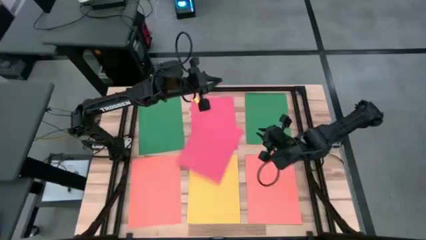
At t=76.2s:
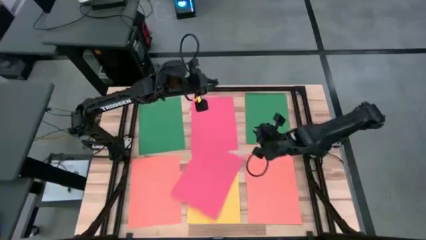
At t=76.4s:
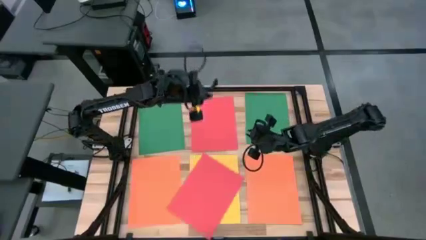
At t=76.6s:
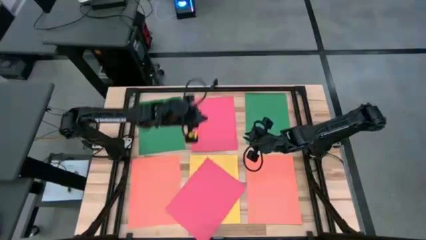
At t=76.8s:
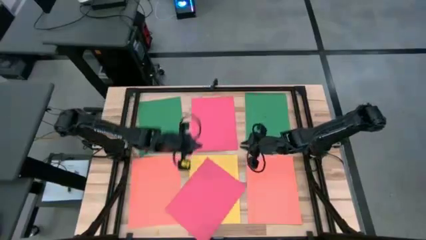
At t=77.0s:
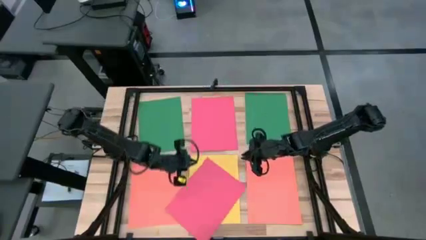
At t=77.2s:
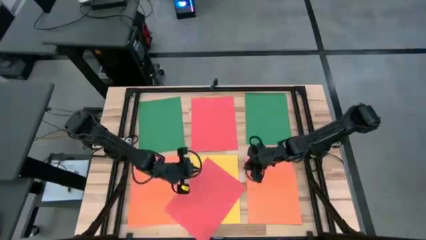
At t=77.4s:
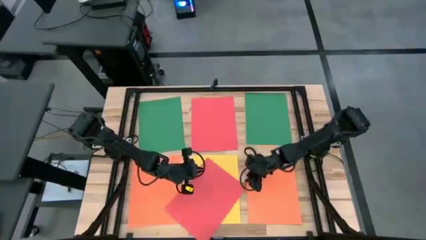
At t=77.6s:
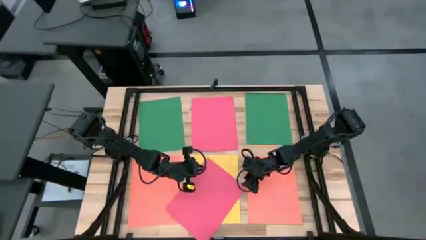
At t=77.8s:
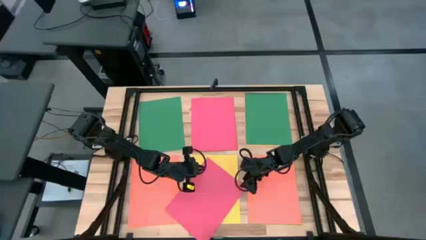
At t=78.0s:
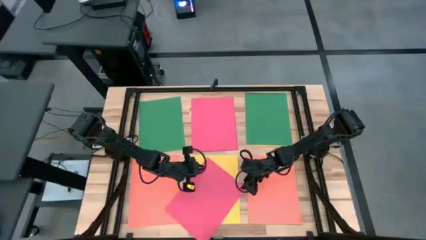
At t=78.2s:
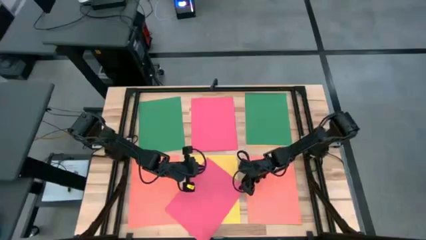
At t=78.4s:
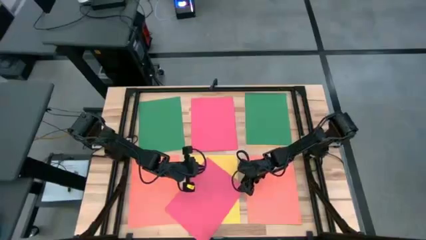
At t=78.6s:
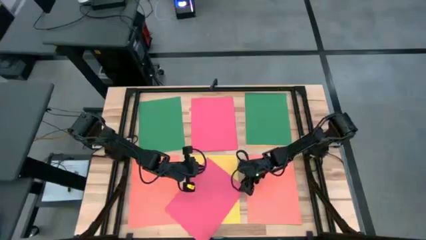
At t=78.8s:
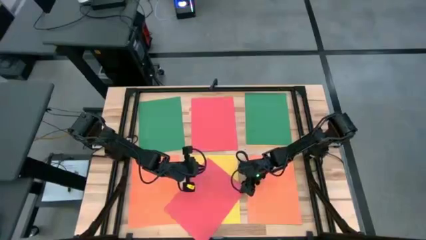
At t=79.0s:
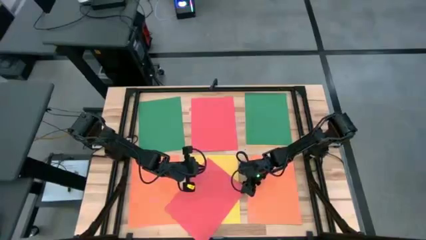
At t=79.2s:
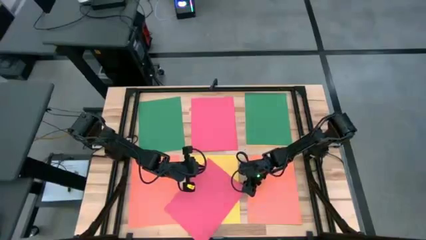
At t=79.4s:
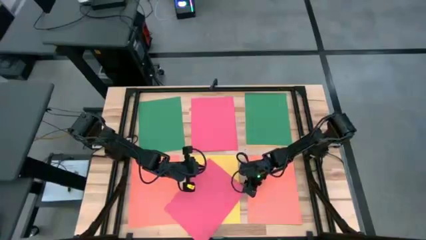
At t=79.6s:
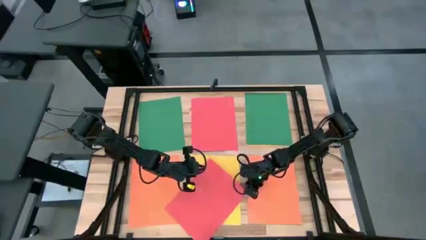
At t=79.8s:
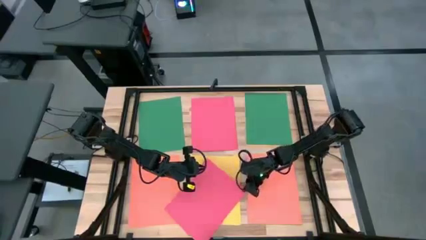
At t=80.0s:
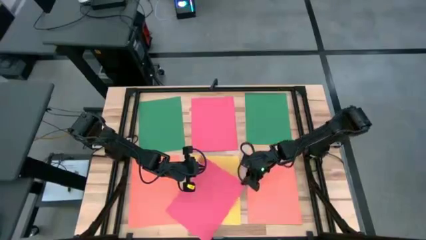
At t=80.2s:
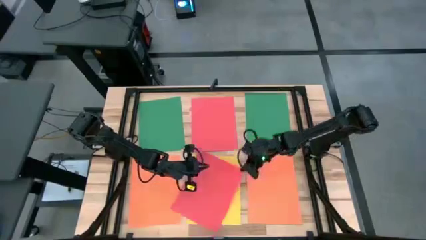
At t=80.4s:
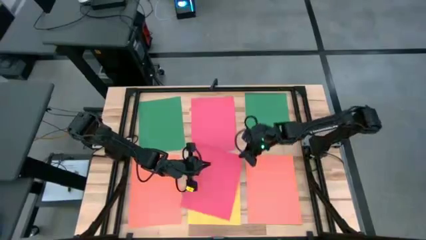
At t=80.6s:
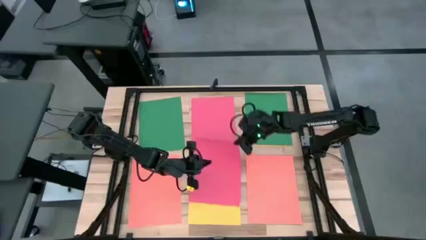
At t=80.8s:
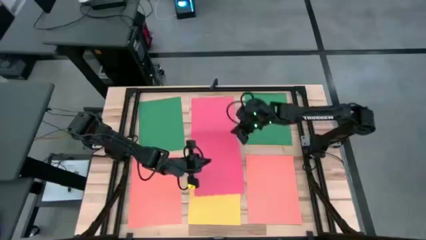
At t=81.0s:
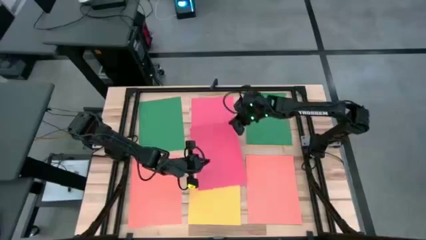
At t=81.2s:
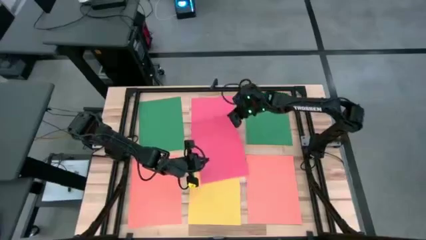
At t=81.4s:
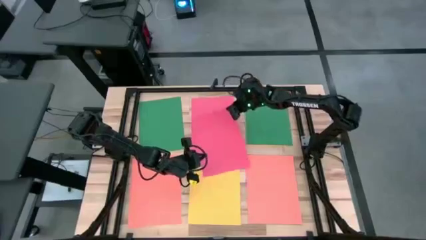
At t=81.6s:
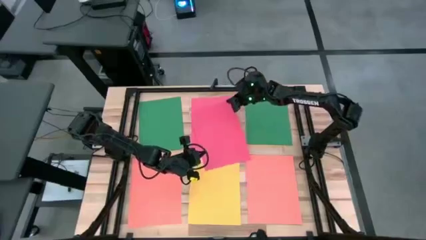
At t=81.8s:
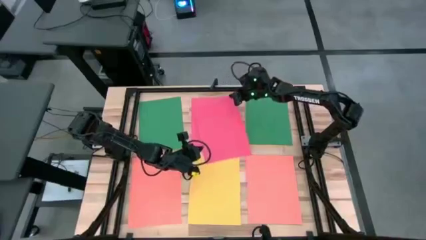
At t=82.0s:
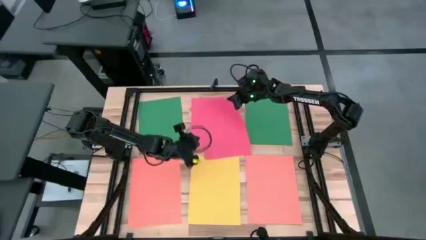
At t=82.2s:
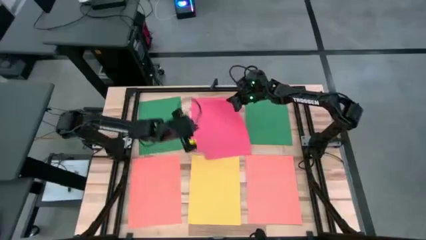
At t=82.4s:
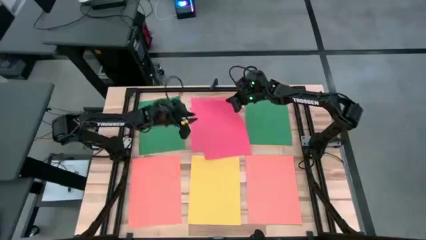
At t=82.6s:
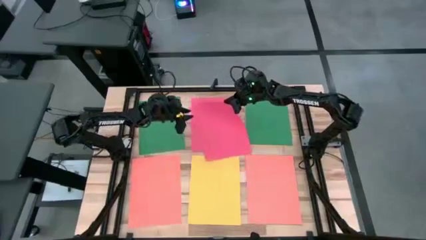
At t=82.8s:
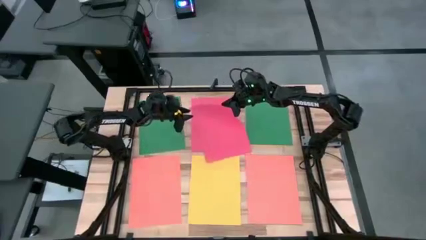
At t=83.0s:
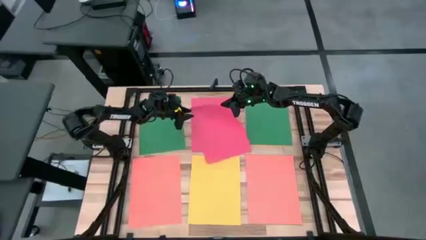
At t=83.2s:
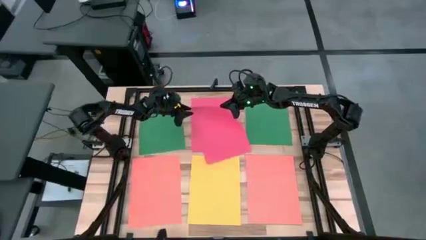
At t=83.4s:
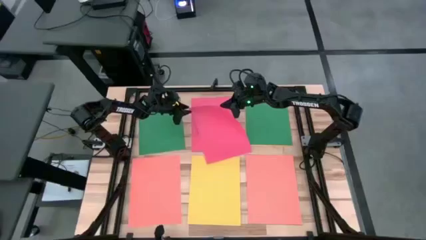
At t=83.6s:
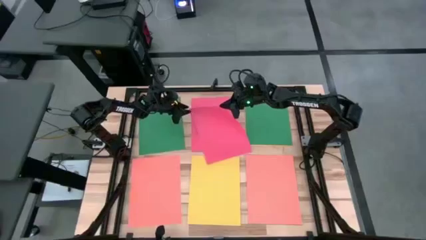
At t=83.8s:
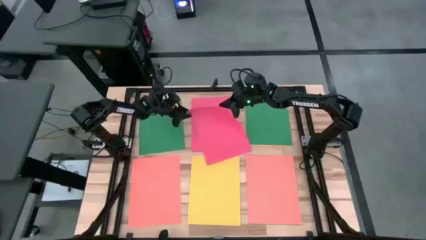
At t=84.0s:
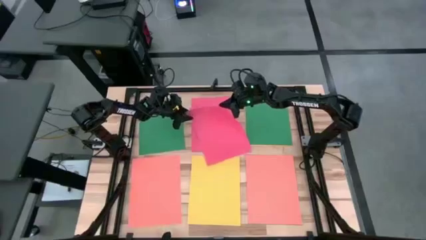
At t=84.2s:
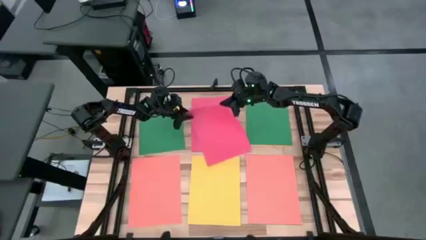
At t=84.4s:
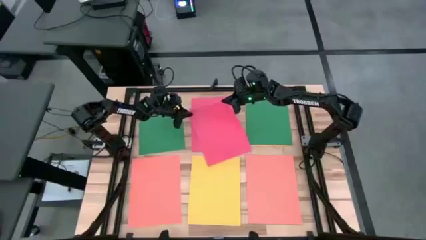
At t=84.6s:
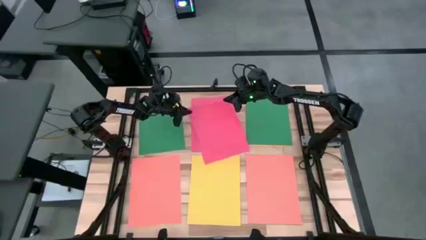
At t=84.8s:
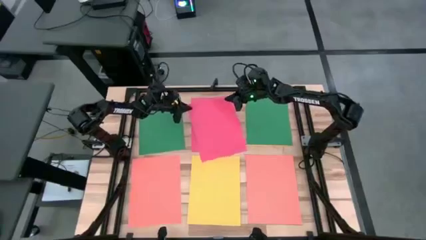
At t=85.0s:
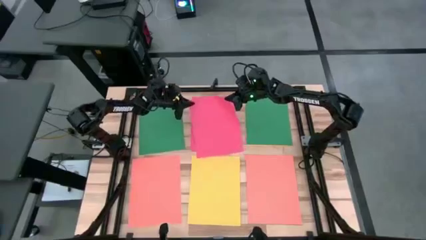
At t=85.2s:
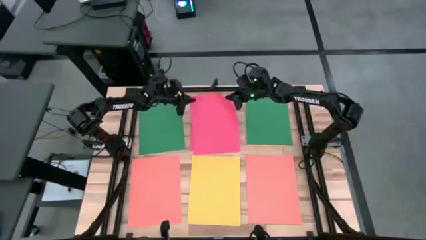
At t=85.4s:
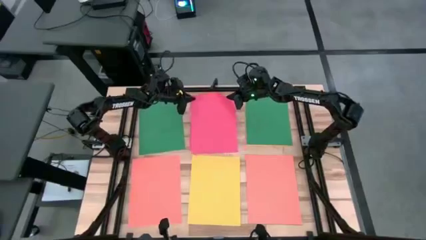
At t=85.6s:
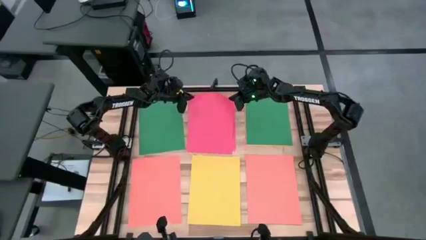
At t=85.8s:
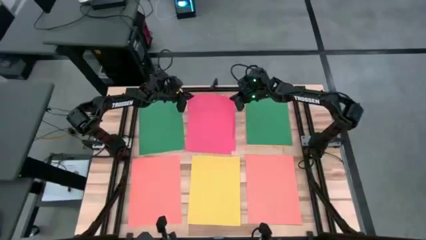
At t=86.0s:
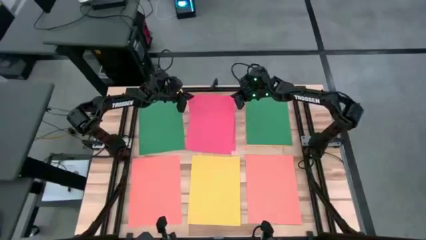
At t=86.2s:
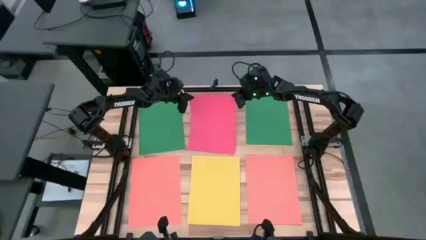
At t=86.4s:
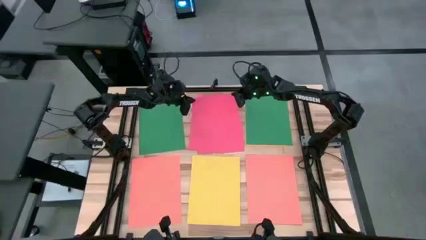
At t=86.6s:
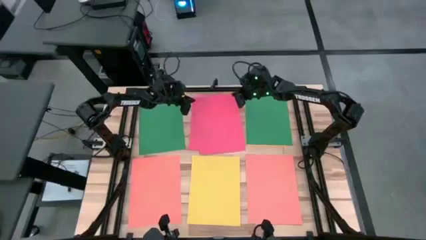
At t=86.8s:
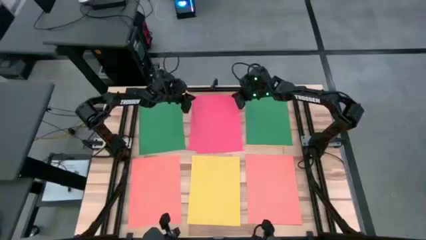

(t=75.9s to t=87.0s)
Task: Organize paper
Stack the pink paper on top of the pink paper
